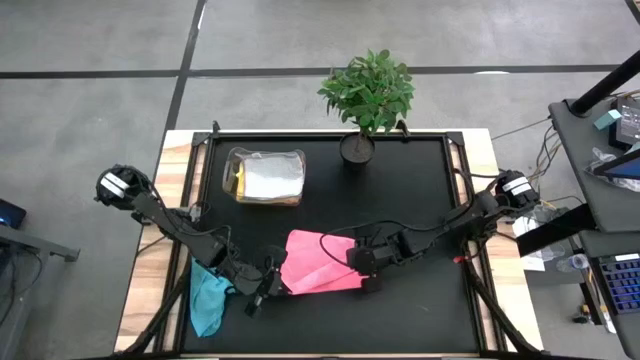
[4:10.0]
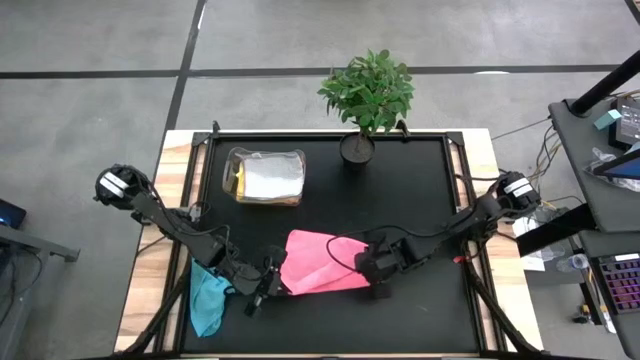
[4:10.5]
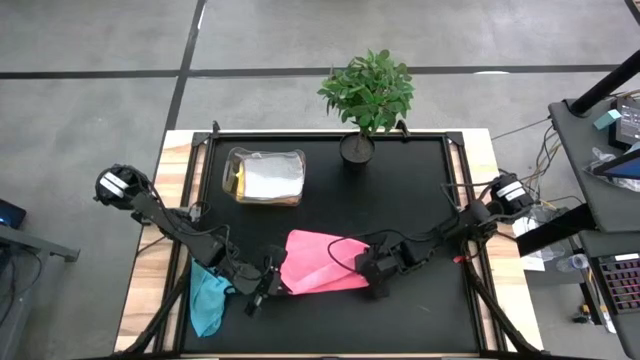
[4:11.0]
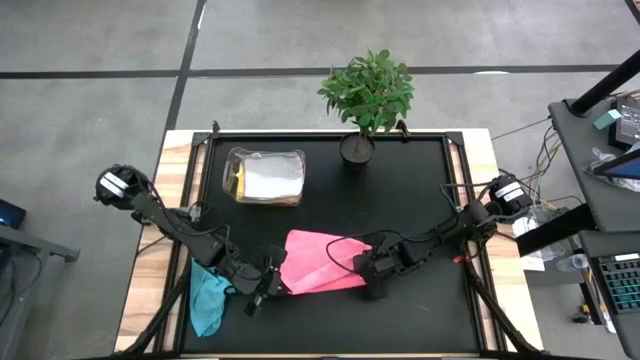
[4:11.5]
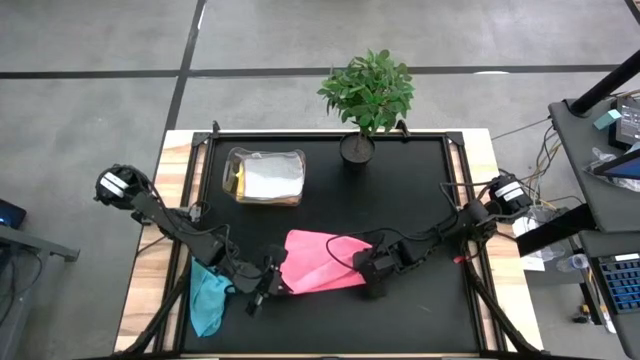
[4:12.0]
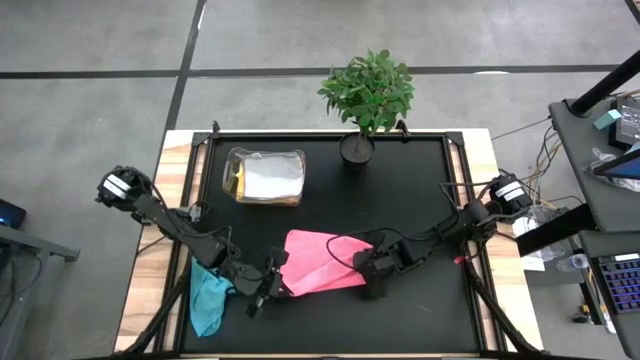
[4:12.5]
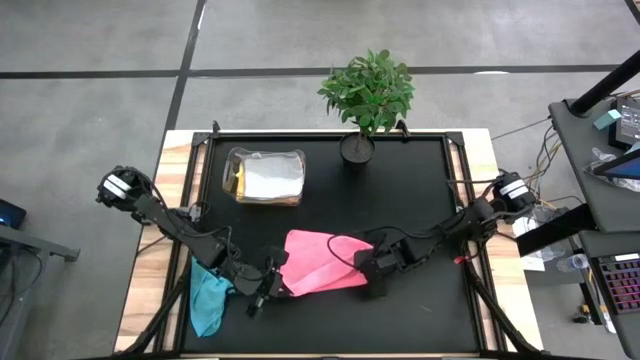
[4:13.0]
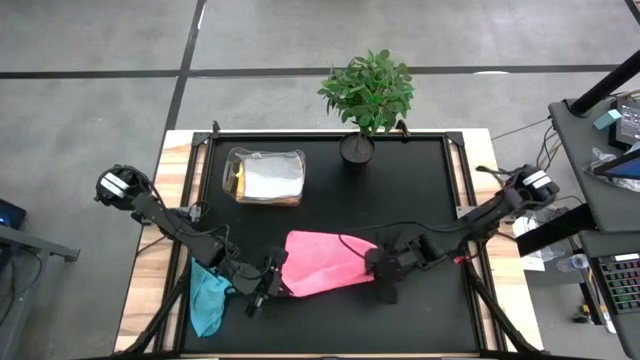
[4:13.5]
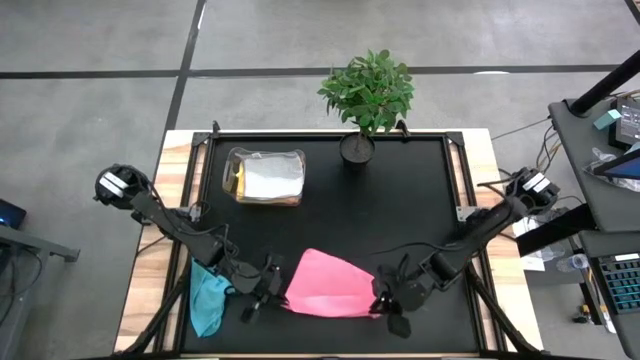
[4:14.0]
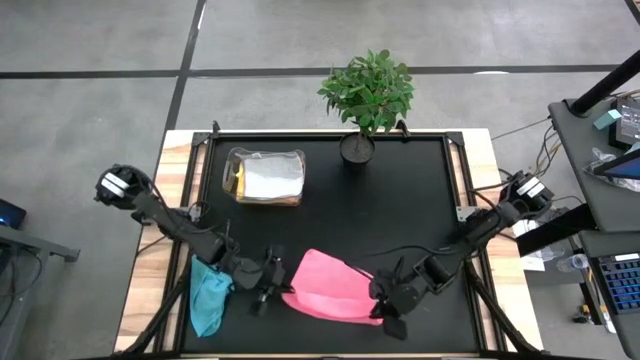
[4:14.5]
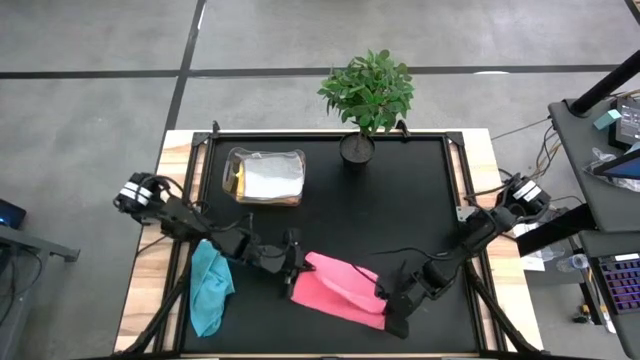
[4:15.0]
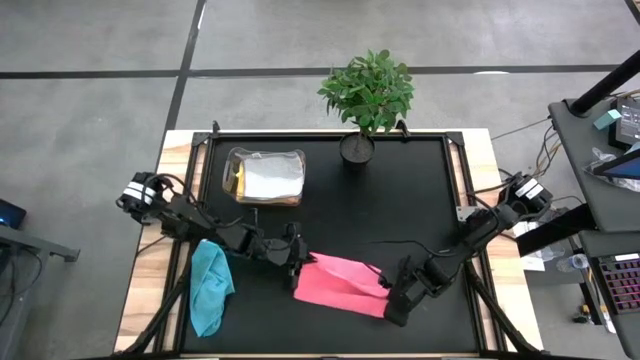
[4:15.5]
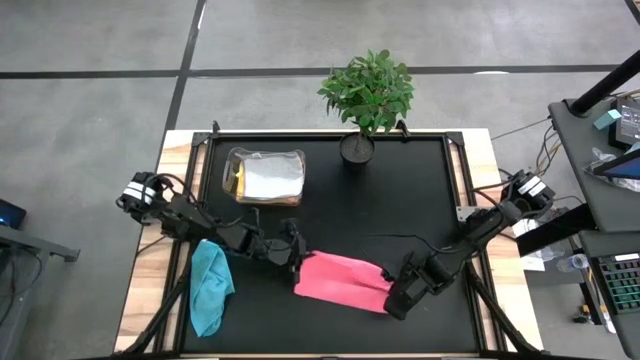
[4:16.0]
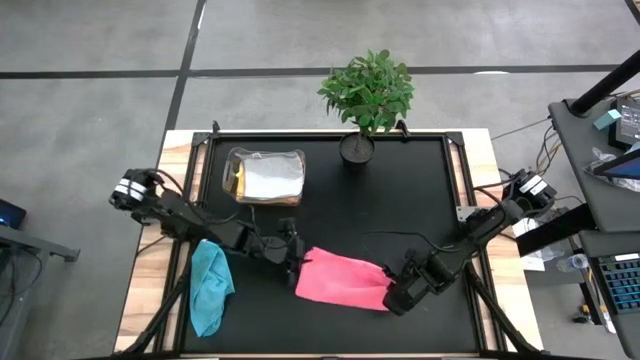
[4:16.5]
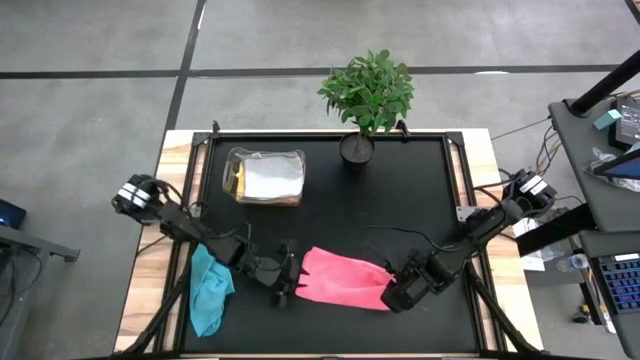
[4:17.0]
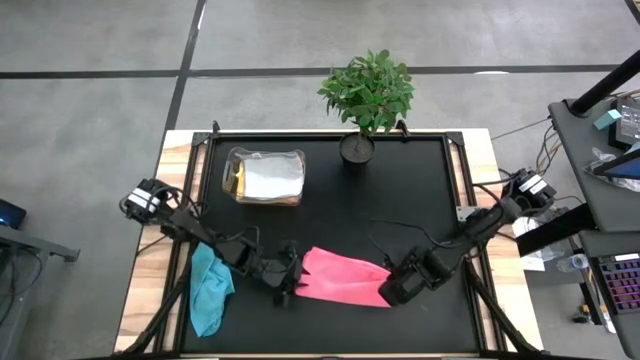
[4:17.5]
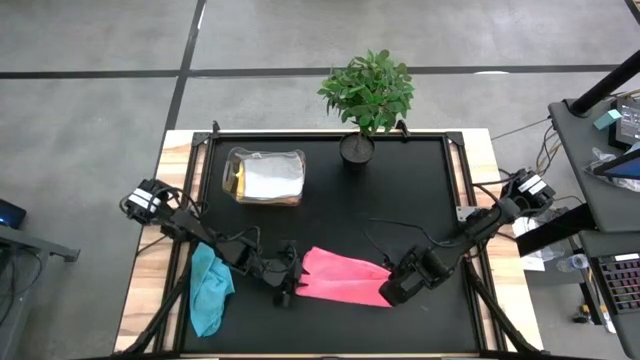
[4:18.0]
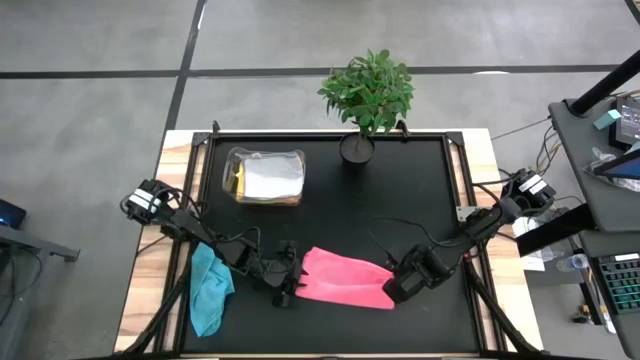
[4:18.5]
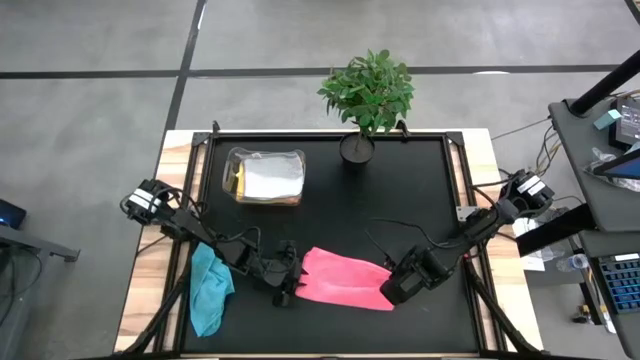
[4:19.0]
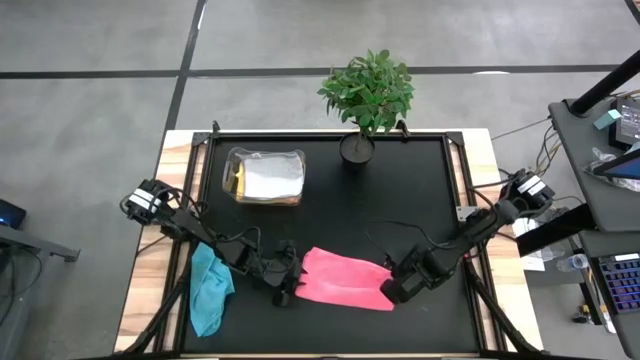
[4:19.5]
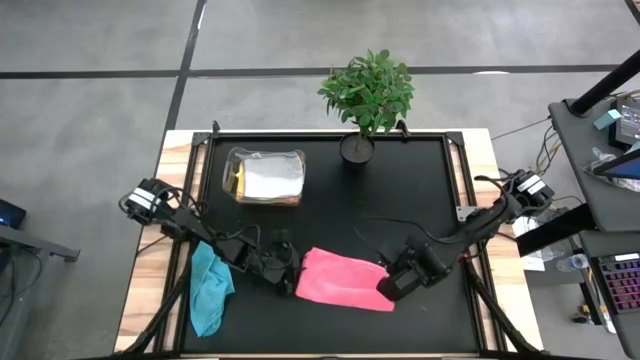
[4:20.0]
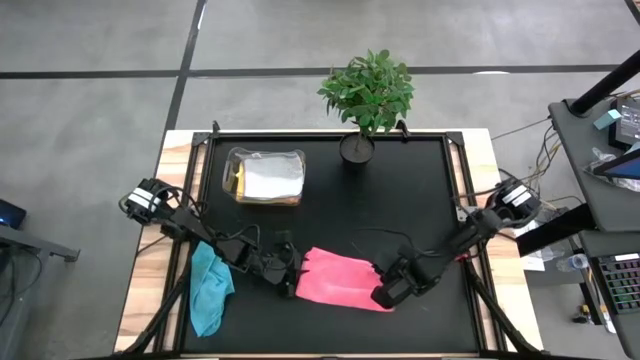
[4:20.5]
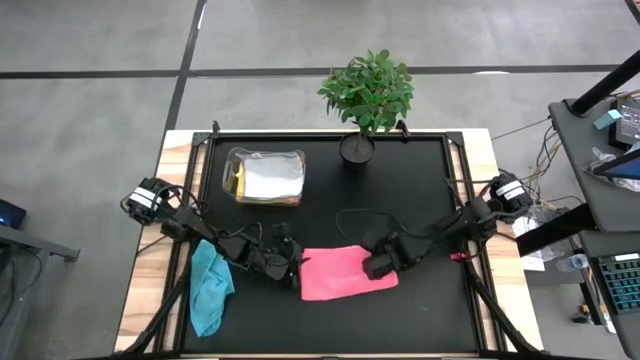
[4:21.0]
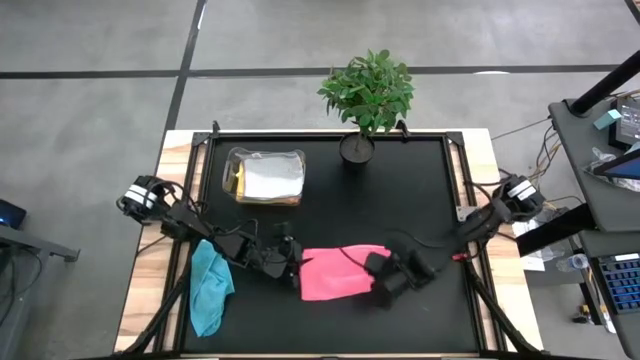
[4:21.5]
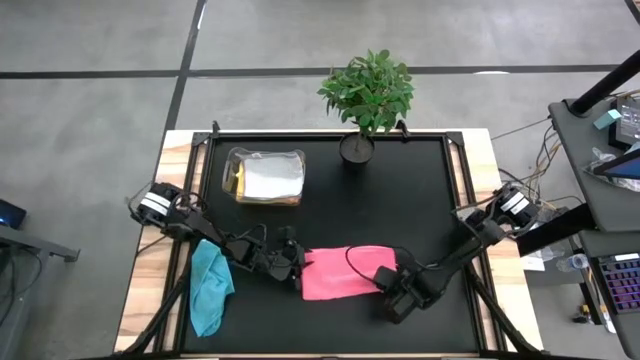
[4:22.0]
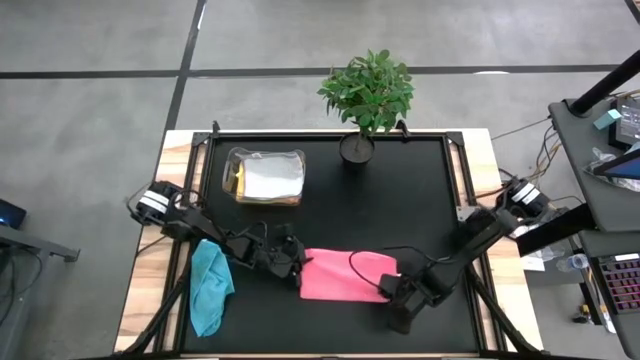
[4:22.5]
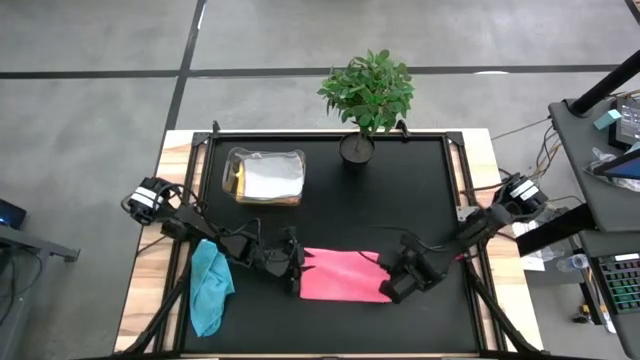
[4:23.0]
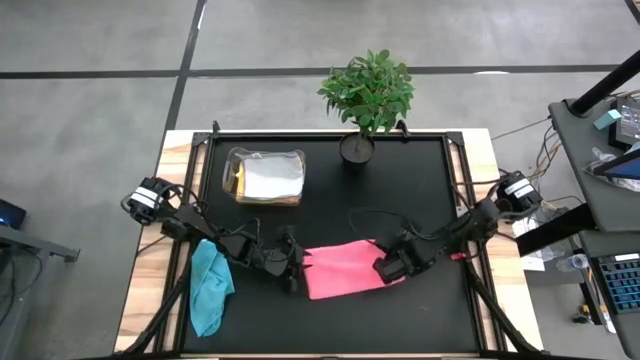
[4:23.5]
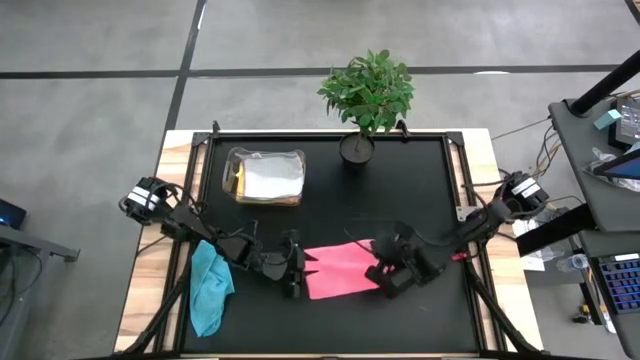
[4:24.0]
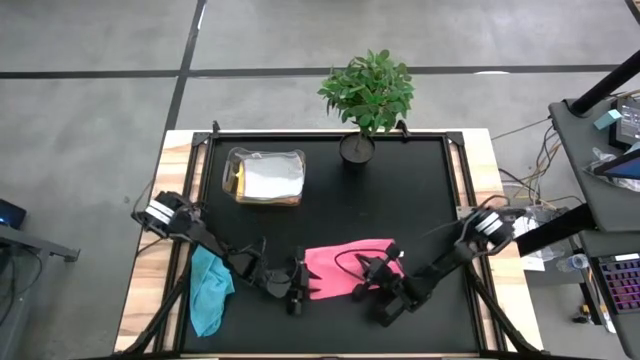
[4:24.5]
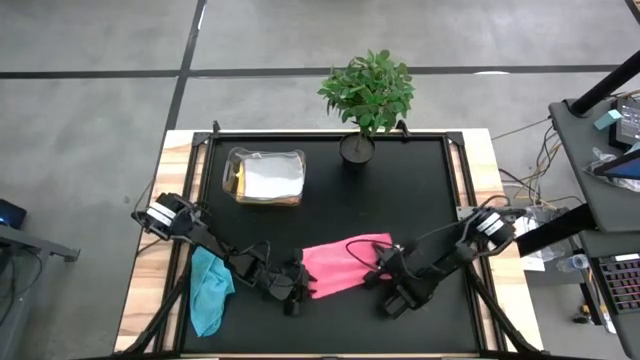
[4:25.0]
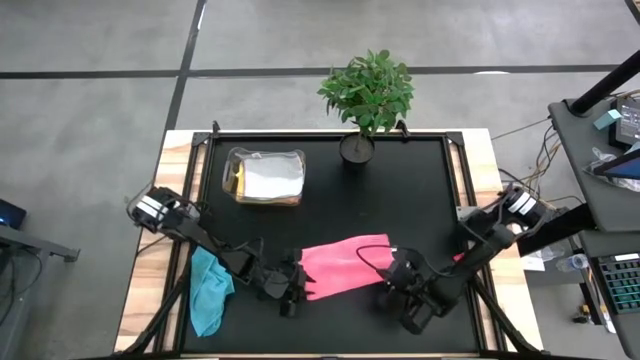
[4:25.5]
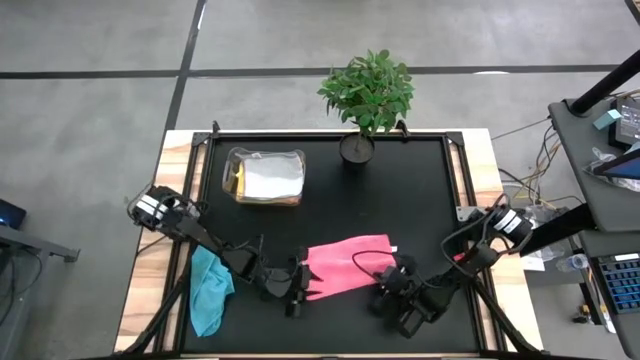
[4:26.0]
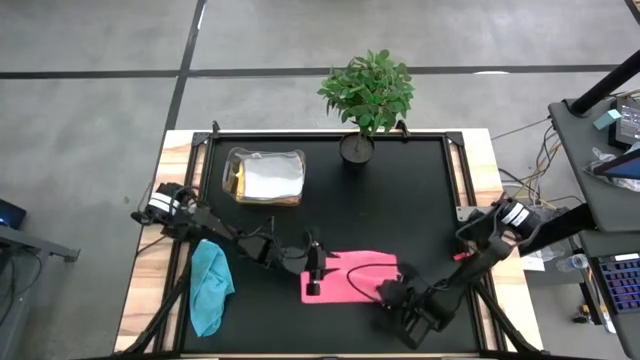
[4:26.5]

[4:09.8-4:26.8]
Task: Fold microfiber towels
Fold the pink towel

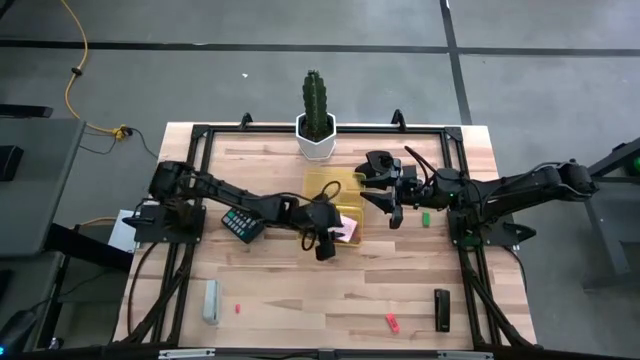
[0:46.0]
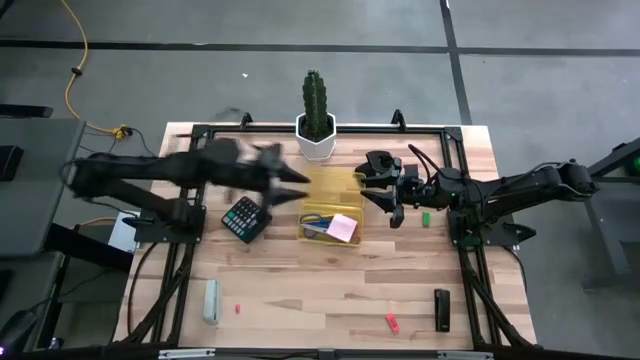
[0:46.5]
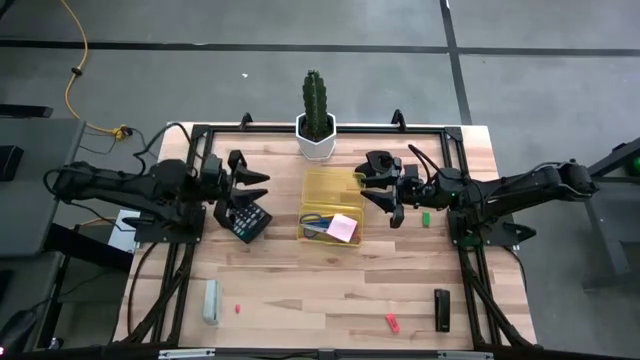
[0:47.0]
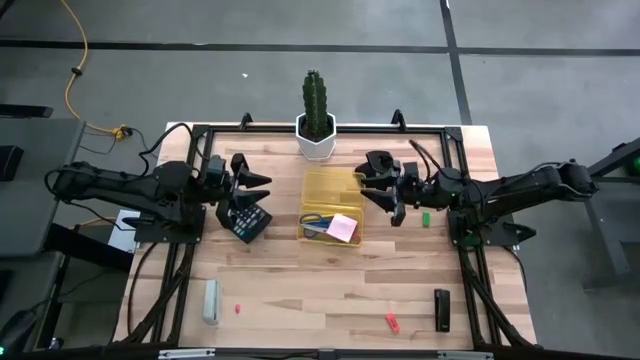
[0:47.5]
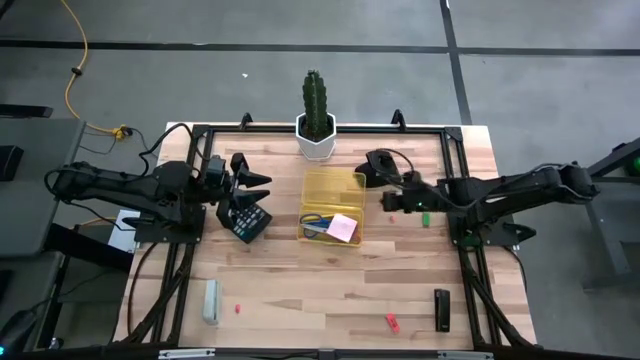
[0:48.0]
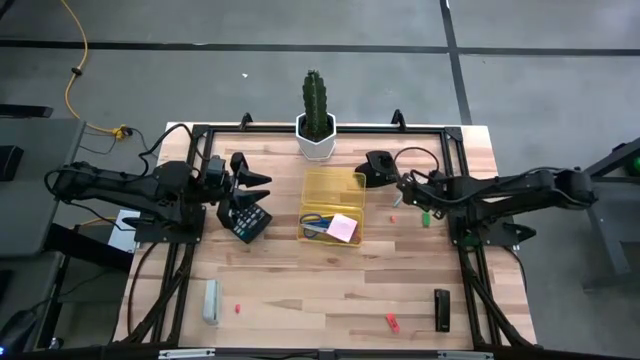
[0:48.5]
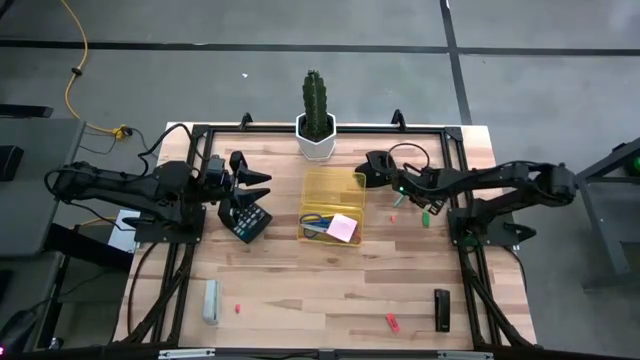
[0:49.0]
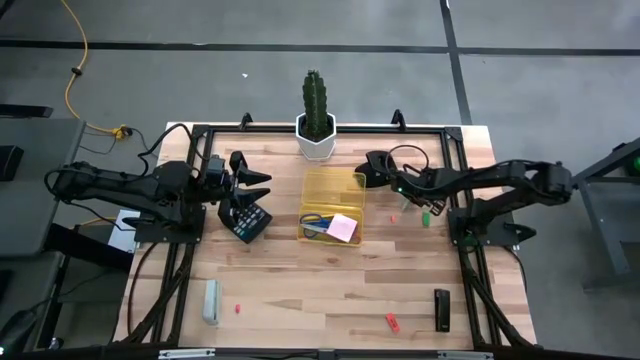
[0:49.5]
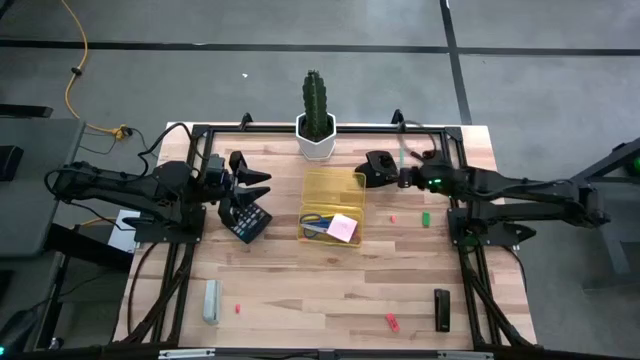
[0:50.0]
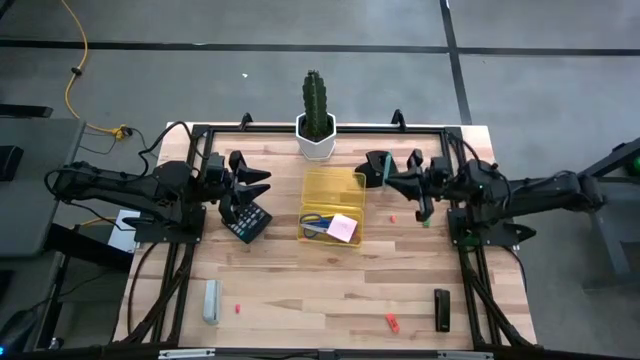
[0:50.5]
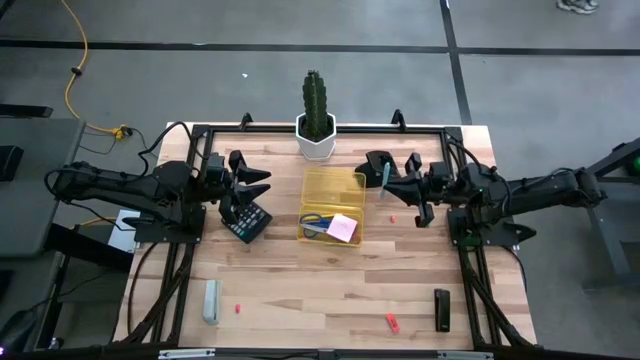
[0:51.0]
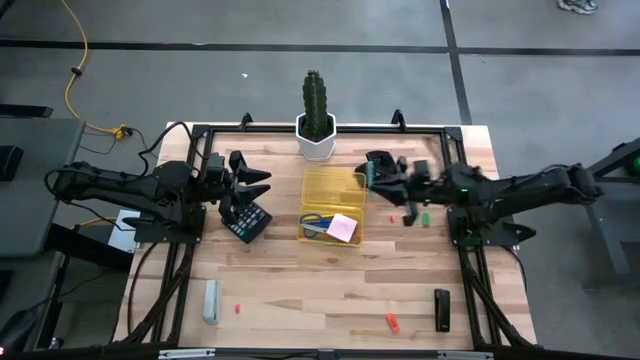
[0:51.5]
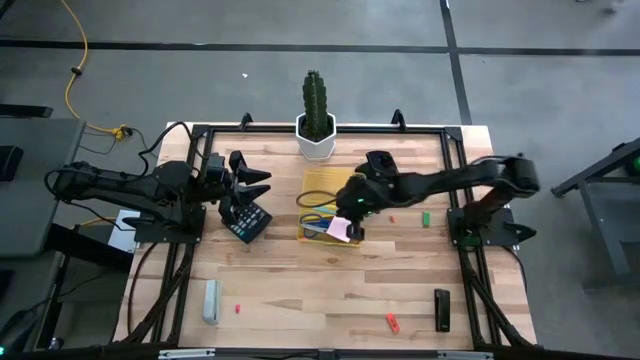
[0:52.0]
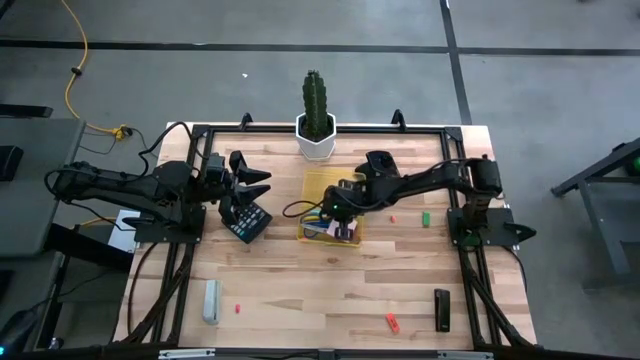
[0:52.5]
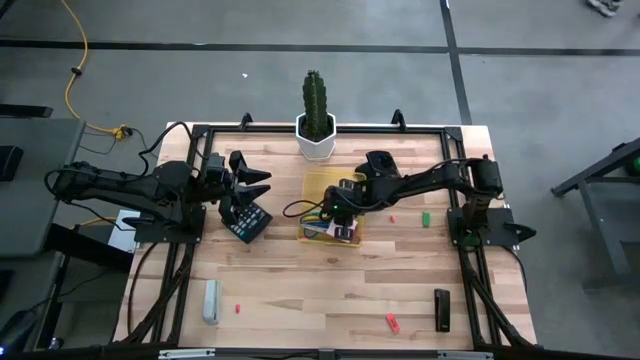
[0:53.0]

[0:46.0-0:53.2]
Task: Pack school essentials
Put the blue pen into the supply box
